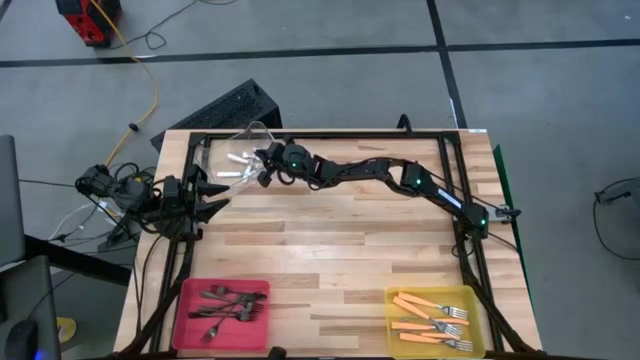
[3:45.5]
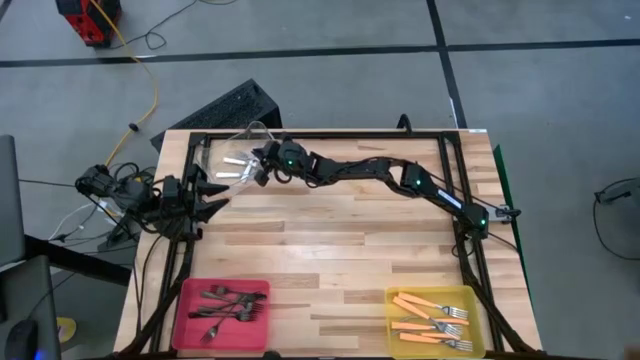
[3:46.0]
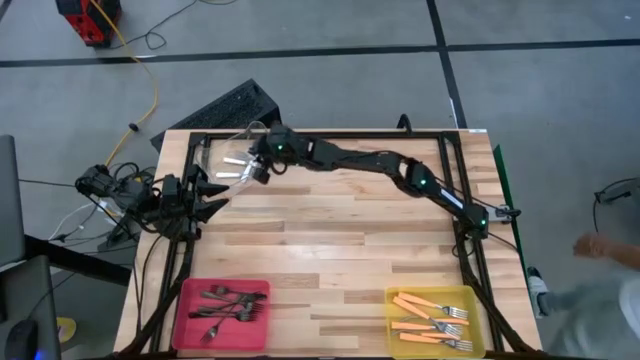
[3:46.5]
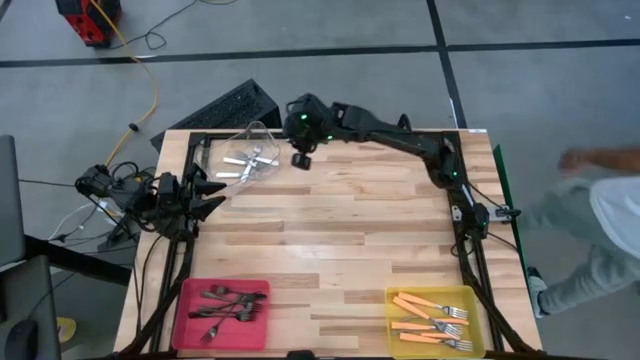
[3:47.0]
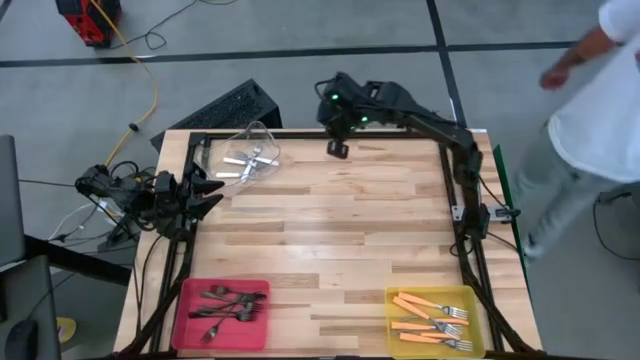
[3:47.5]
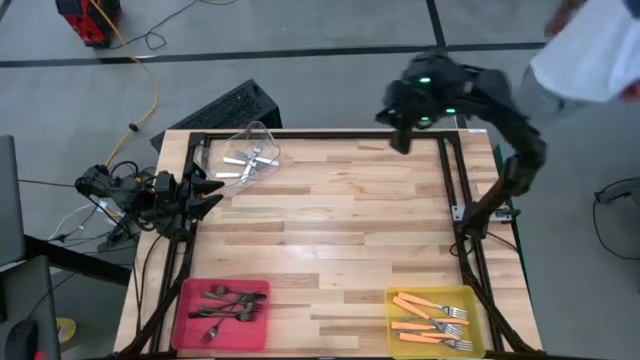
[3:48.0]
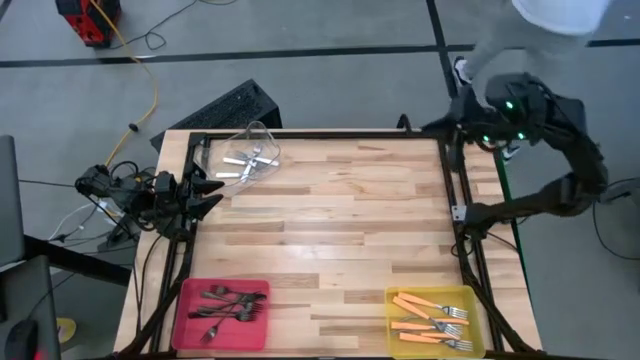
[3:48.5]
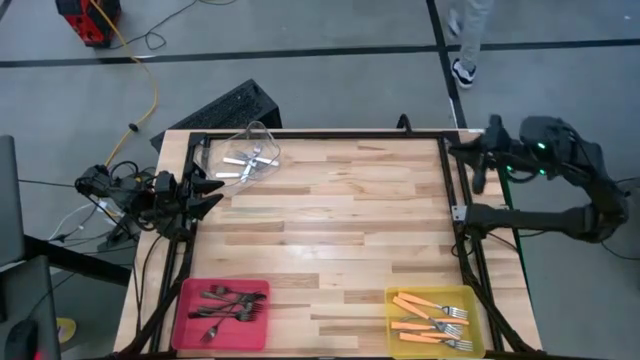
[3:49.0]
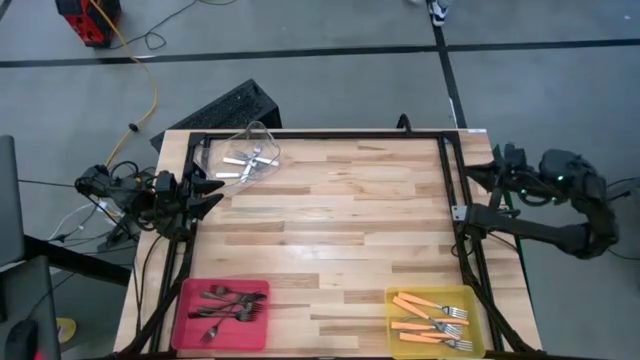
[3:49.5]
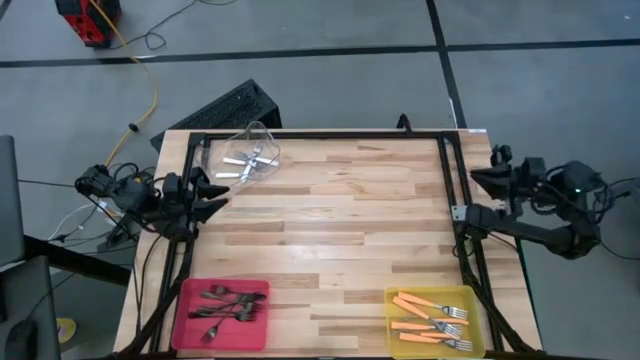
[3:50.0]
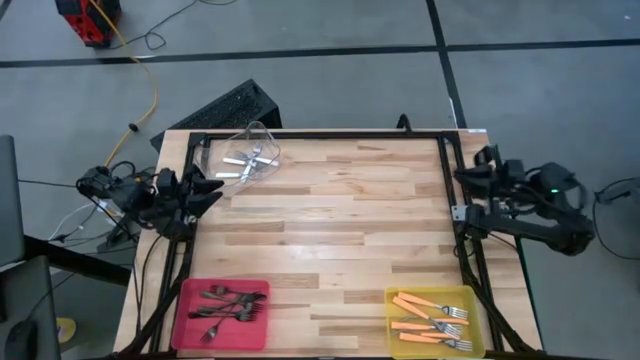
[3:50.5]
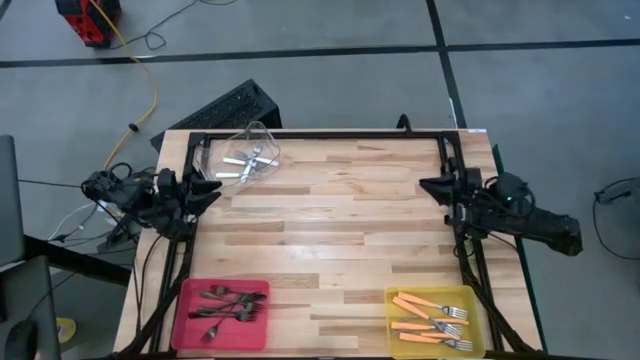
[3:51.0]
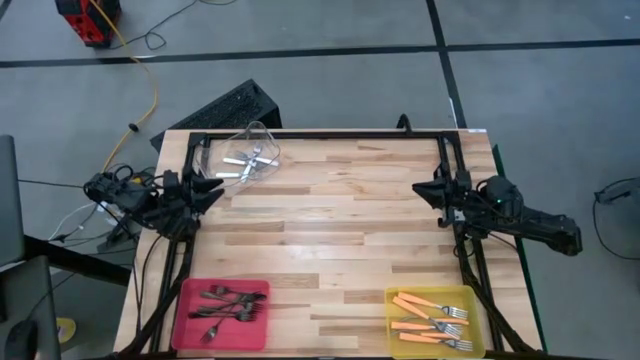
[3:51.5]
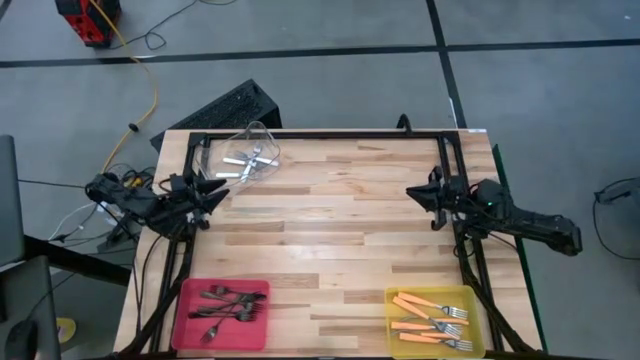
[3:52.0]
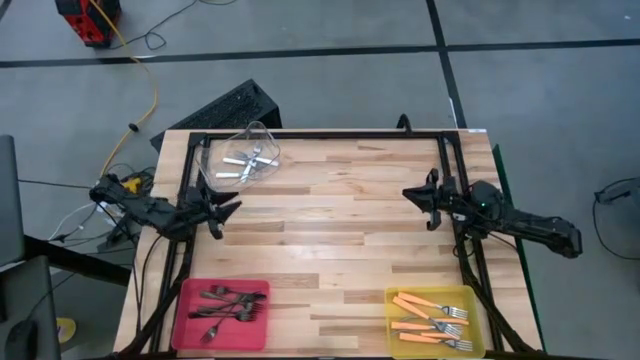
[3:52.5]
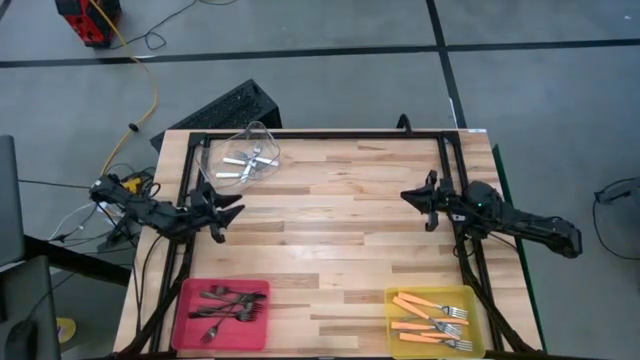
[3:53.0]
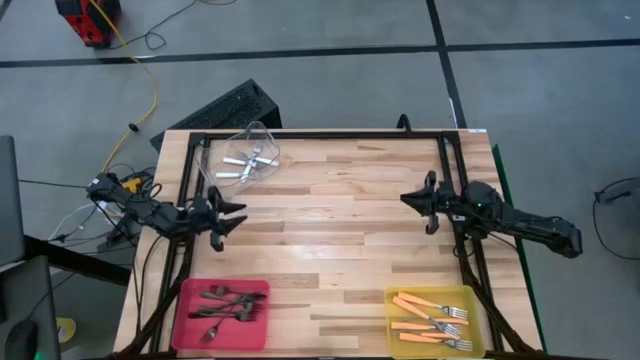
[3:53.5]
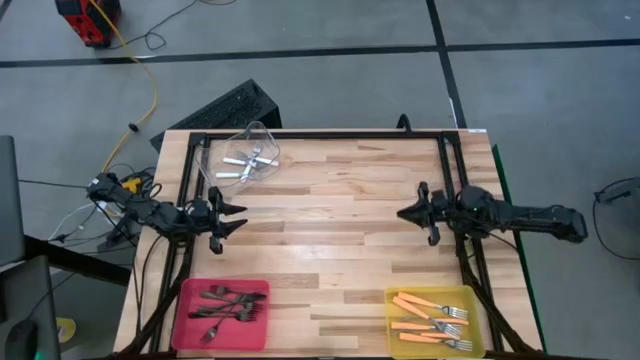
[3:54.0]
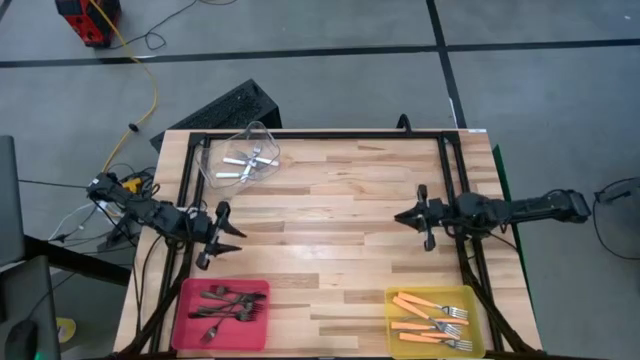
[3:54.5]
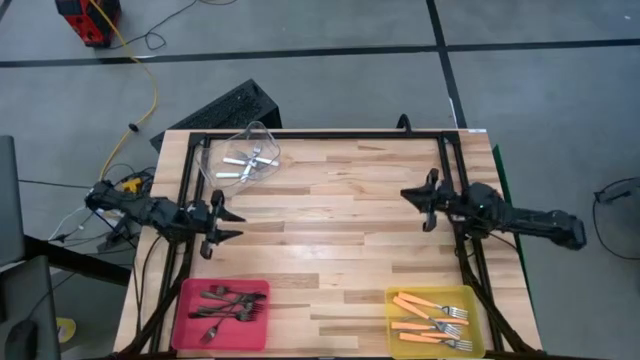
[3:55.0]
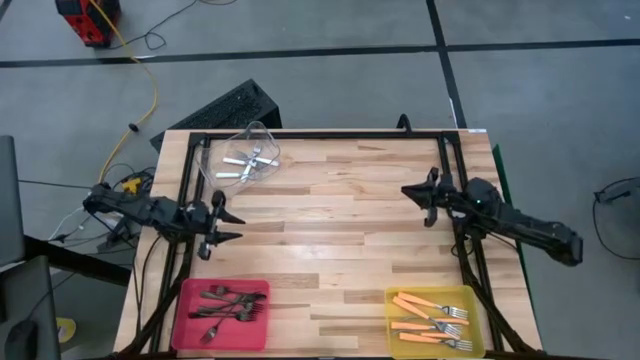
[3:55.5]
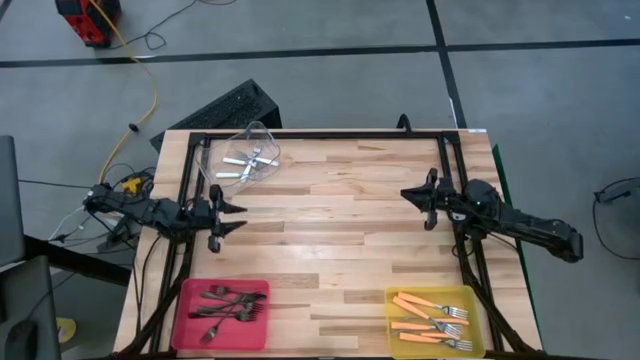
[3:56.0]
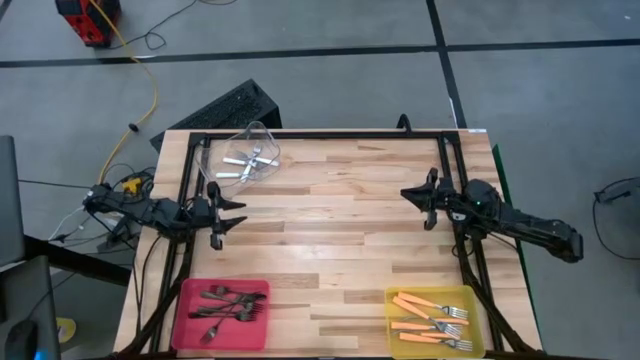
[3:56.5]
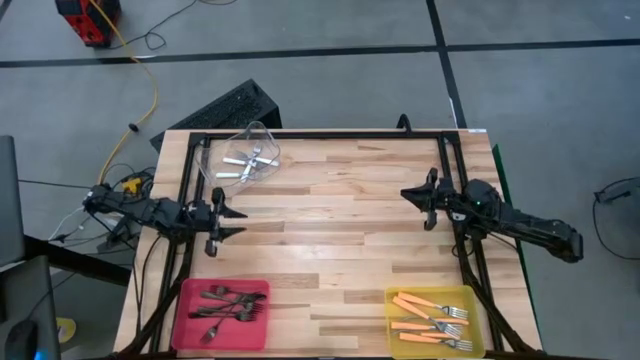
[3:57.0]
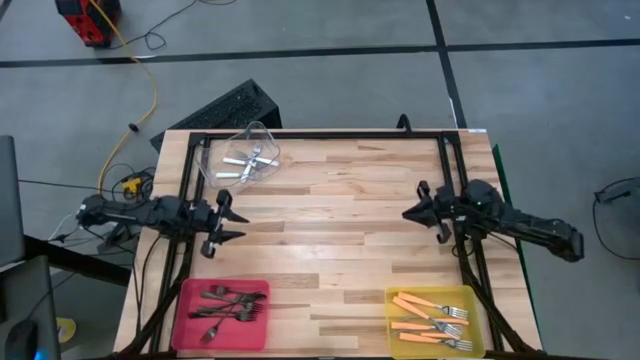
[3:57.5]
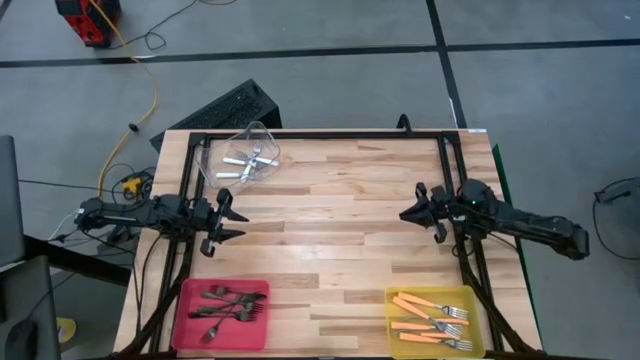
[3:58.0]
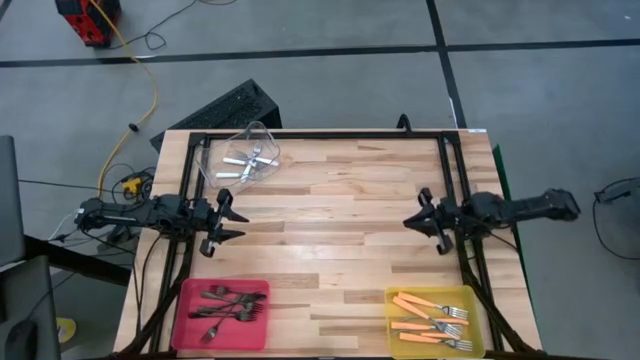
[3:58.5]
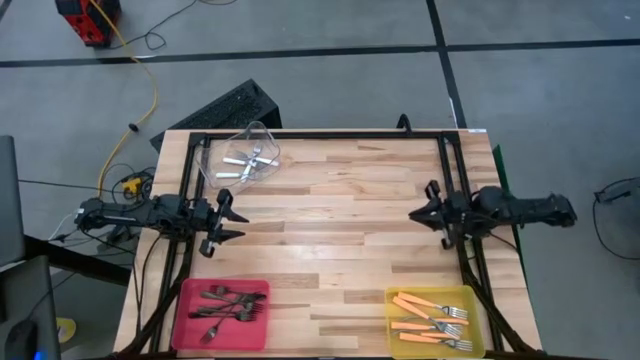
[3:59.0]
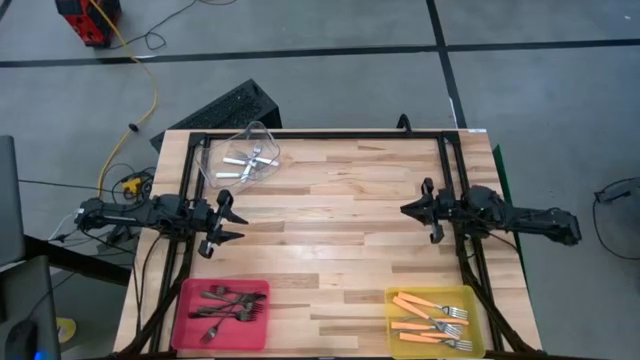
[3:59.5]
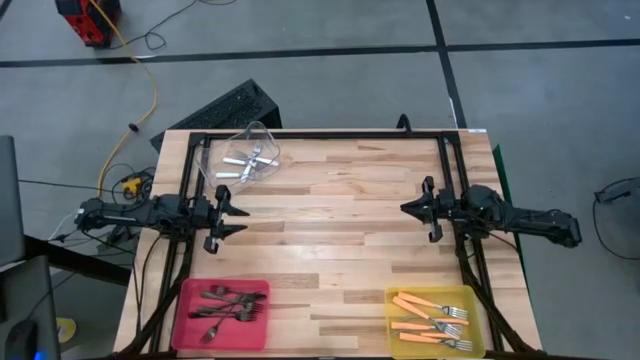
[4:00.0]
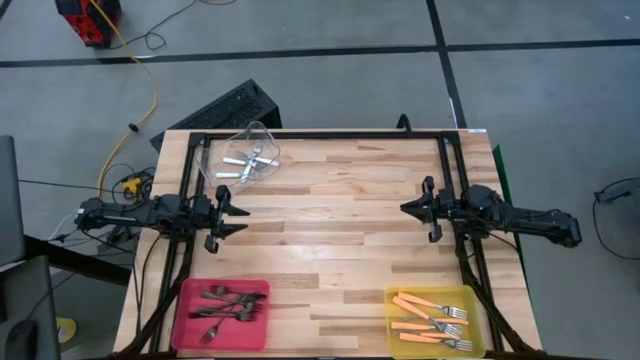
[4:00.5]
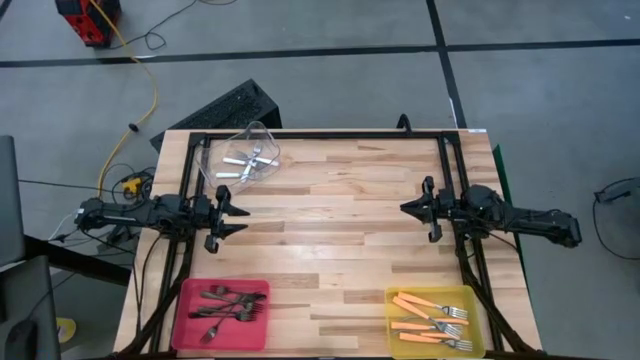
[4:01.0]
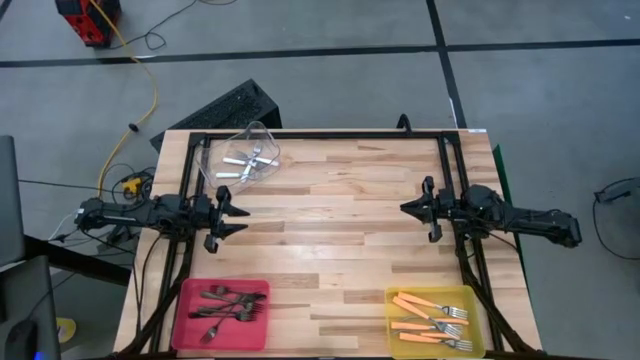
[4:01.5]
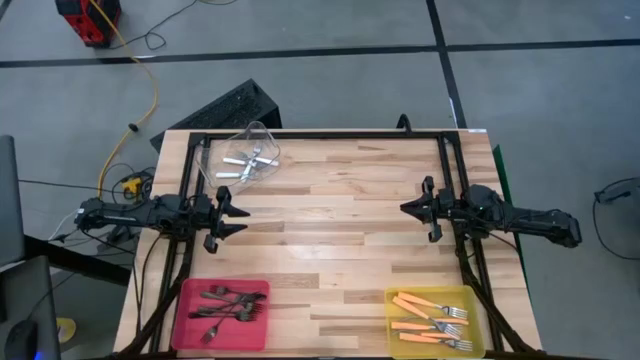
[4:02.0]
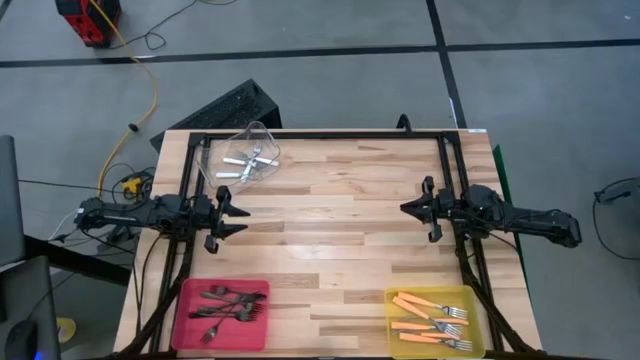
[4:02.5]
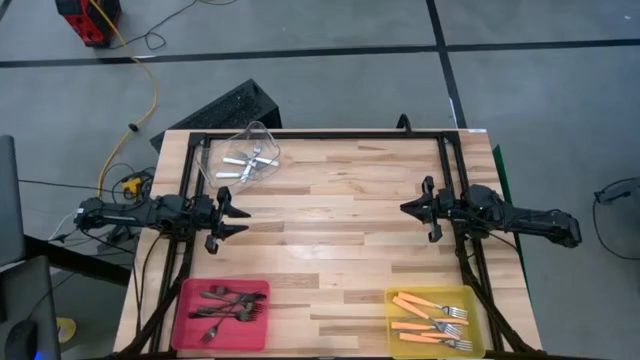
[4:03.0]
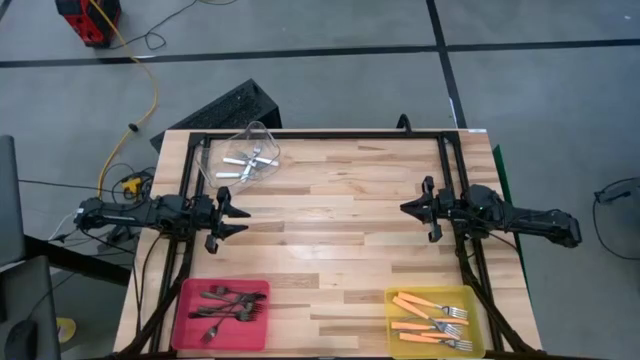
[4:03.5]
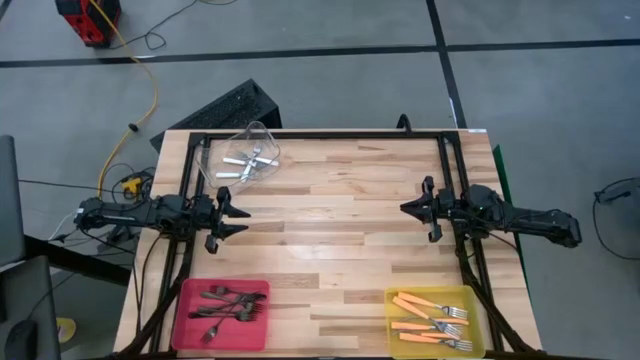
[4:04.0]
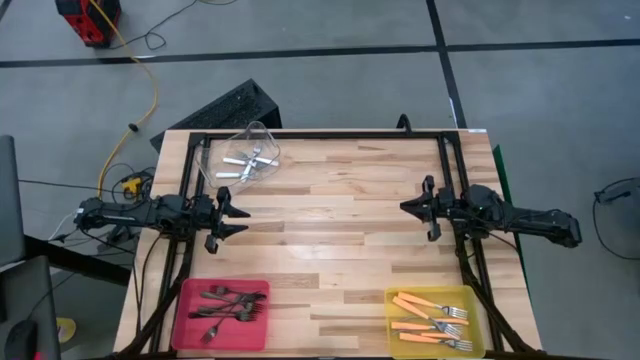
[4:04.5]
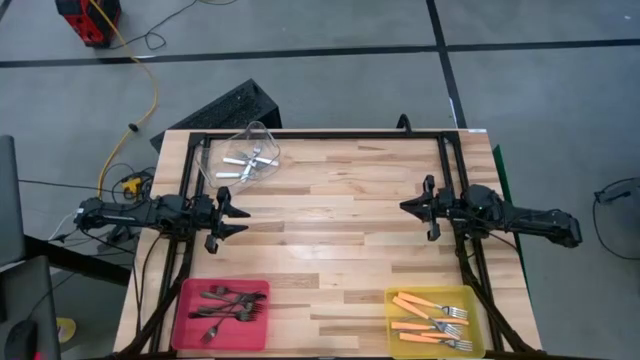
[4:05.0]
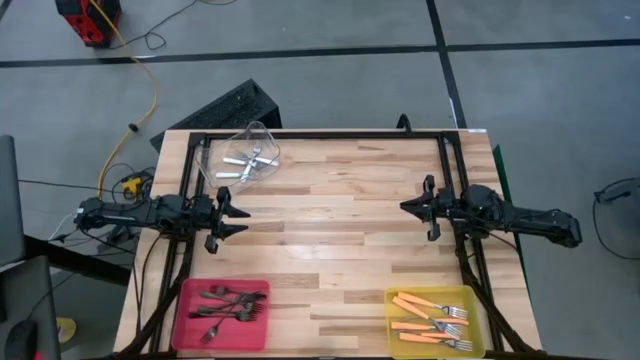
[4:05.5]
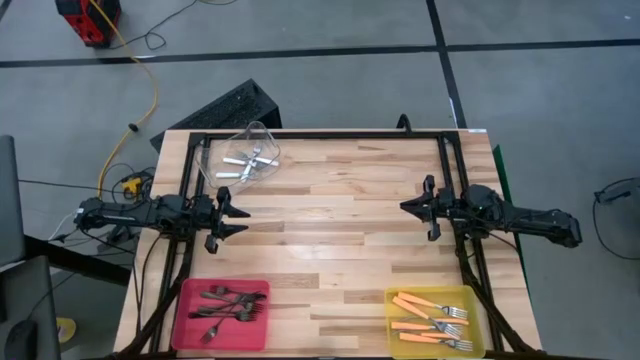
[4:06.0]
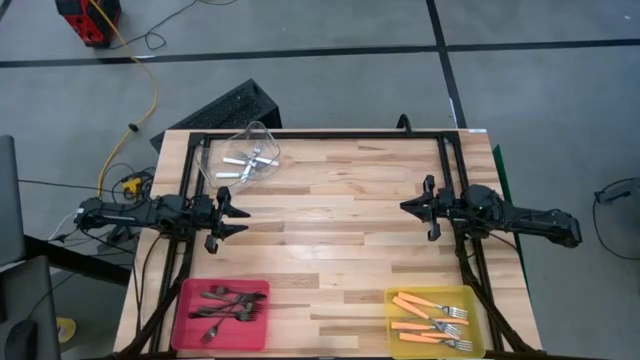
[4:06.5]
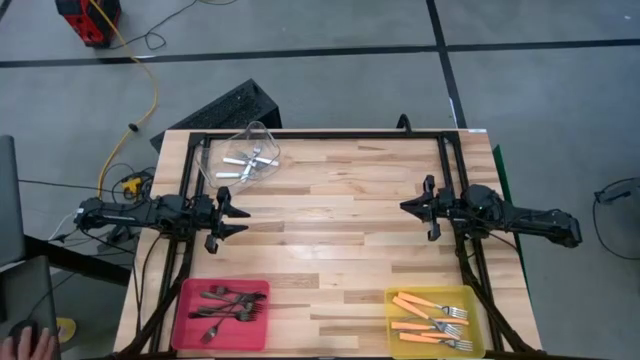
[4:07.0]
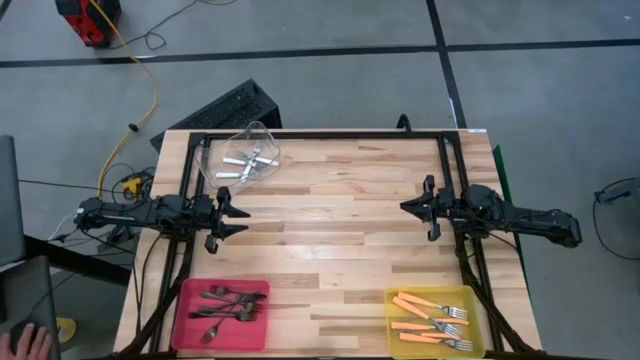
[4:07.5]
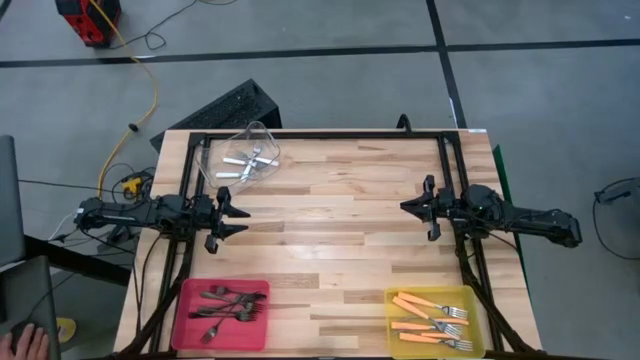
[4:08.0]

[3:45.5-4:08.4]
Task: Sort silverware by color (type)
Return to Home Position

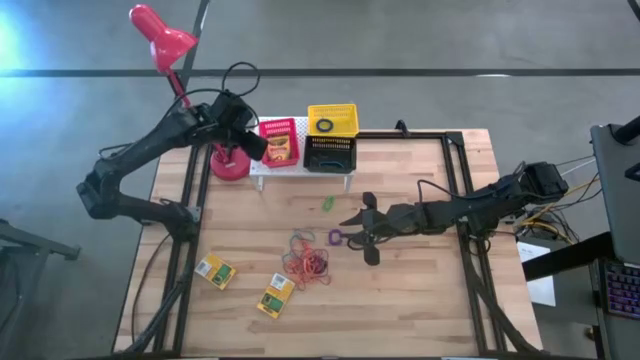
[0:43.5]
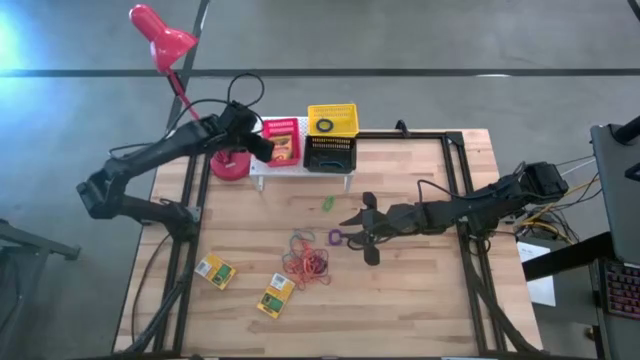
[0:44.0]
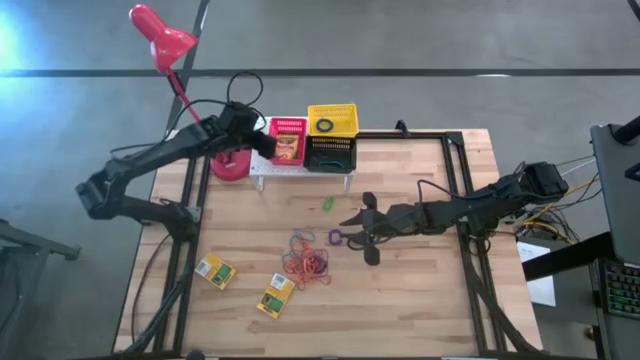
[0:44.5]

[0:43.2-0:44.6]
Task: Pick & Place Office Desk Supplies
Adjust the red bin on the shelf
